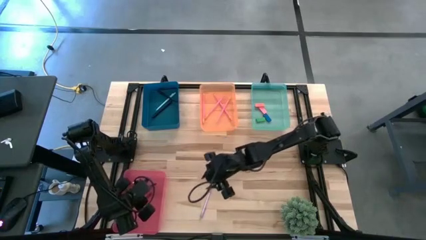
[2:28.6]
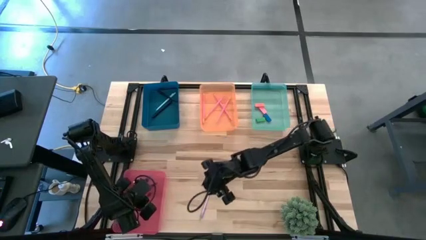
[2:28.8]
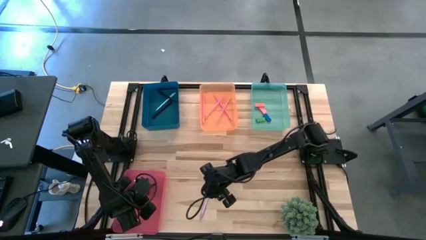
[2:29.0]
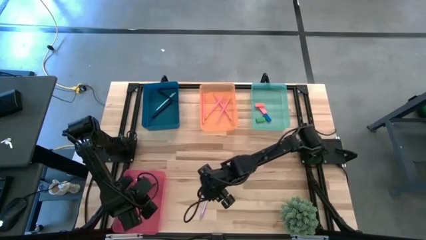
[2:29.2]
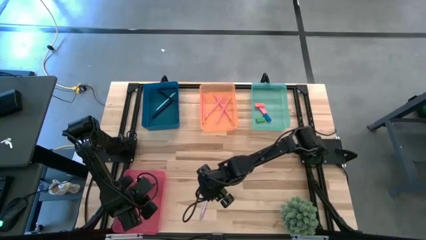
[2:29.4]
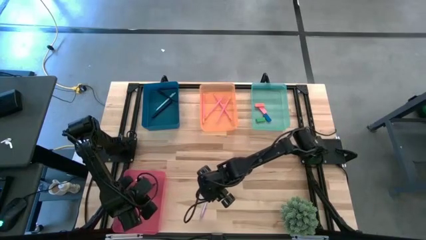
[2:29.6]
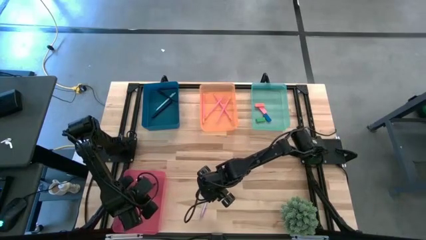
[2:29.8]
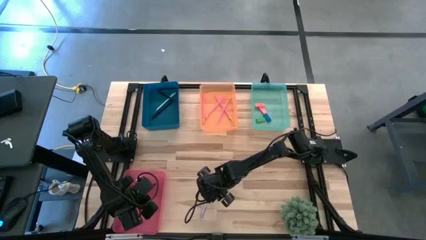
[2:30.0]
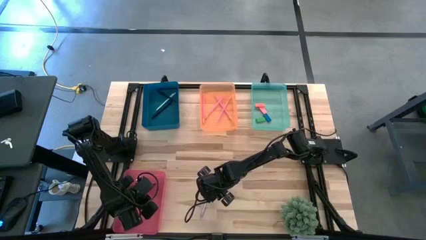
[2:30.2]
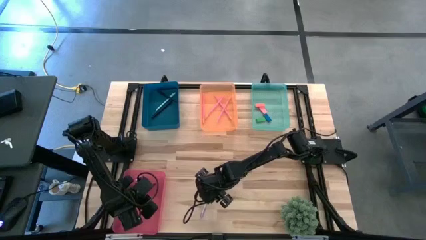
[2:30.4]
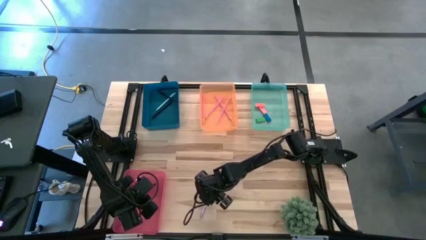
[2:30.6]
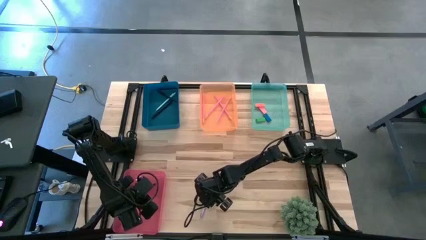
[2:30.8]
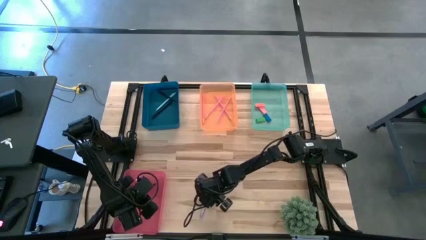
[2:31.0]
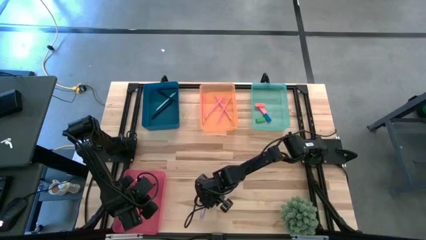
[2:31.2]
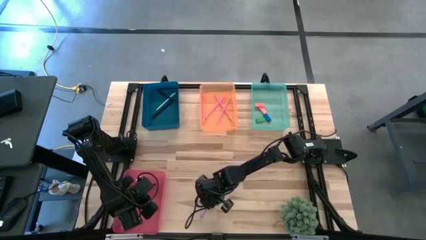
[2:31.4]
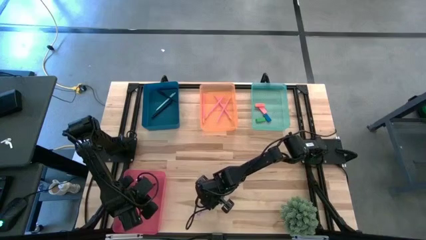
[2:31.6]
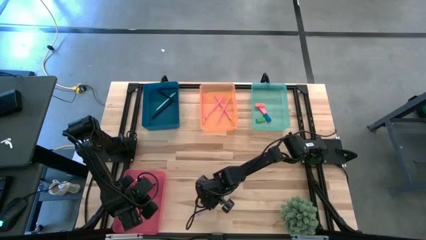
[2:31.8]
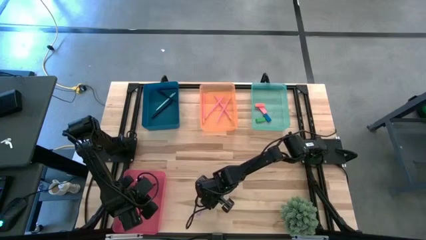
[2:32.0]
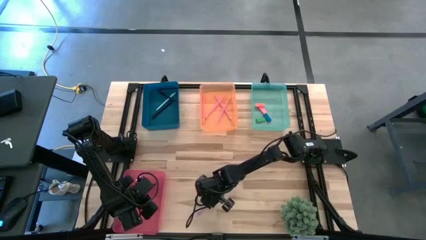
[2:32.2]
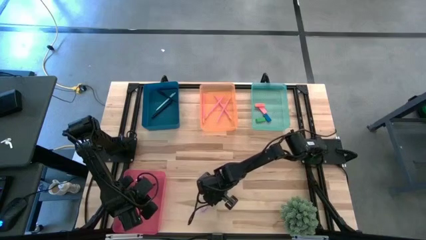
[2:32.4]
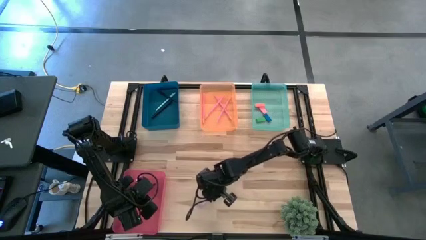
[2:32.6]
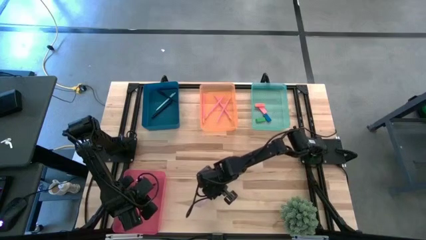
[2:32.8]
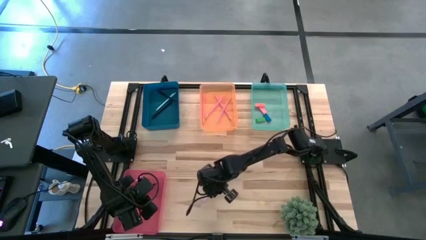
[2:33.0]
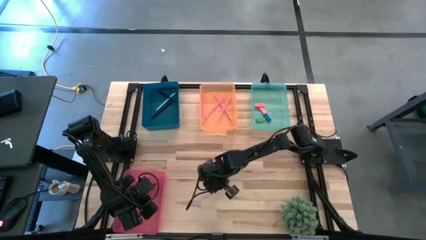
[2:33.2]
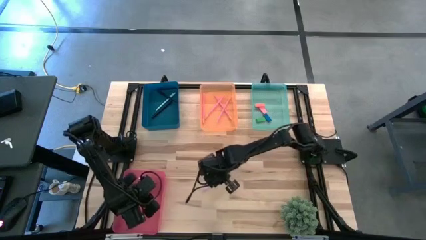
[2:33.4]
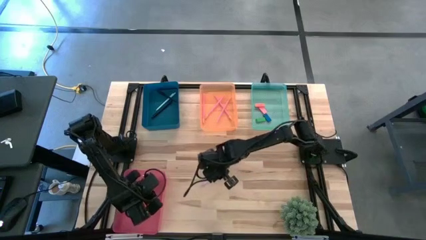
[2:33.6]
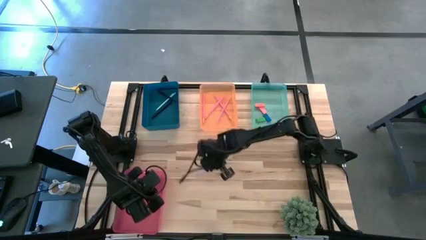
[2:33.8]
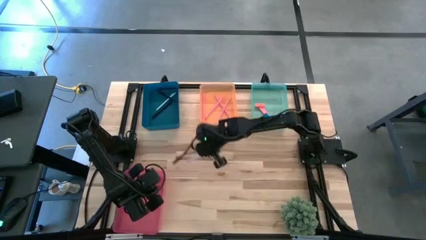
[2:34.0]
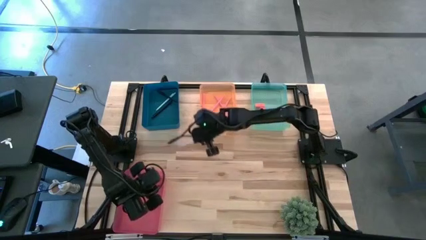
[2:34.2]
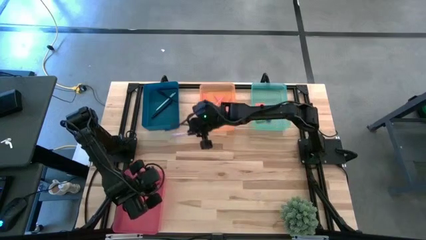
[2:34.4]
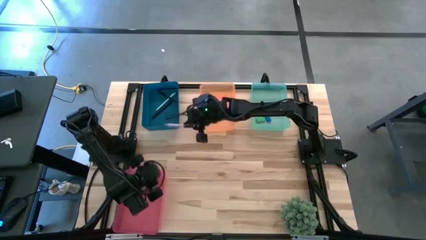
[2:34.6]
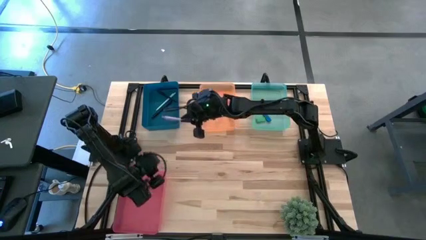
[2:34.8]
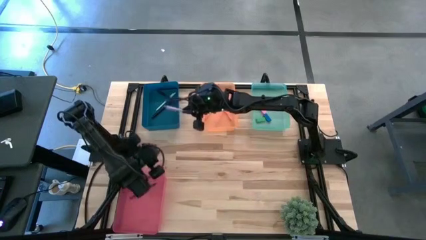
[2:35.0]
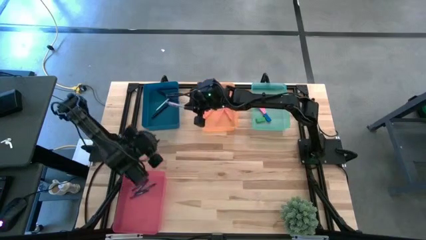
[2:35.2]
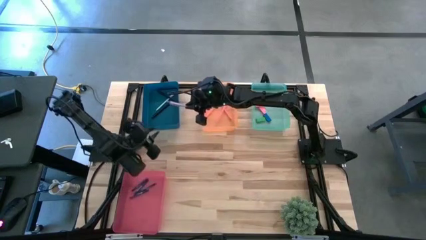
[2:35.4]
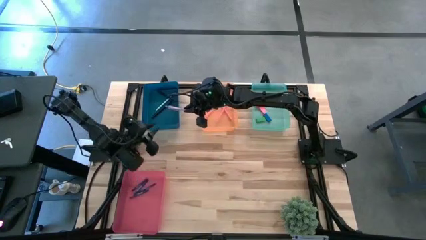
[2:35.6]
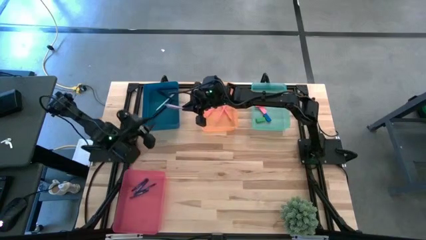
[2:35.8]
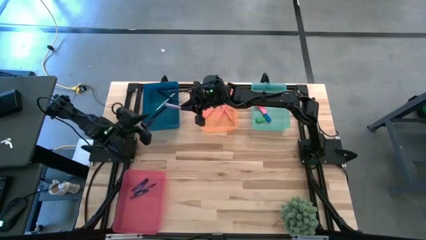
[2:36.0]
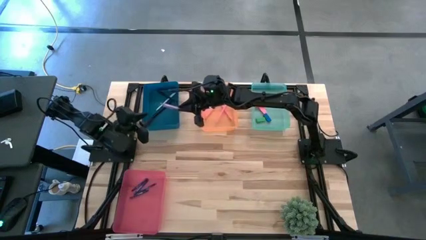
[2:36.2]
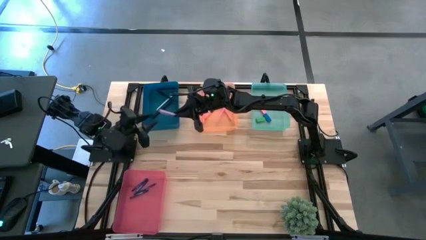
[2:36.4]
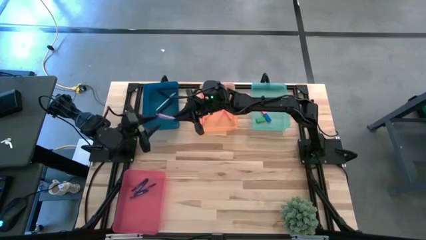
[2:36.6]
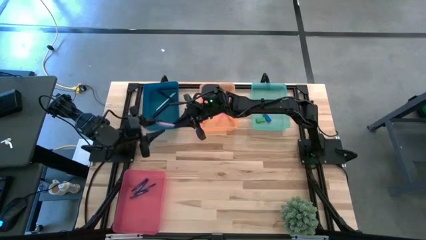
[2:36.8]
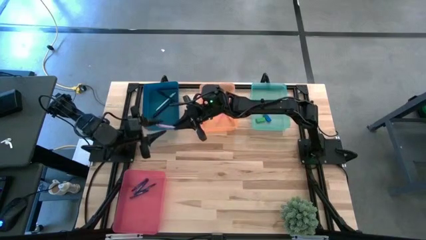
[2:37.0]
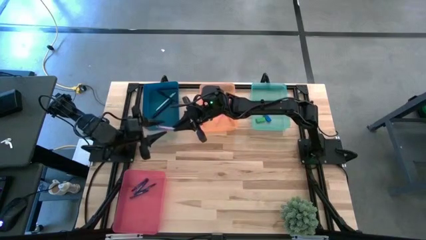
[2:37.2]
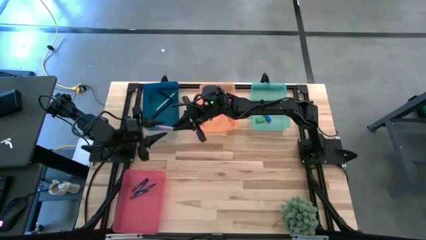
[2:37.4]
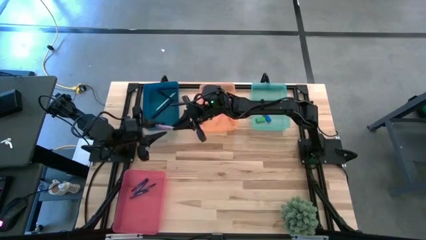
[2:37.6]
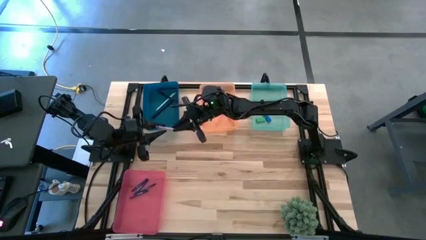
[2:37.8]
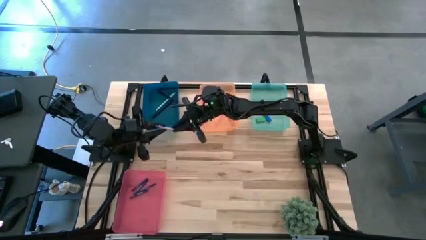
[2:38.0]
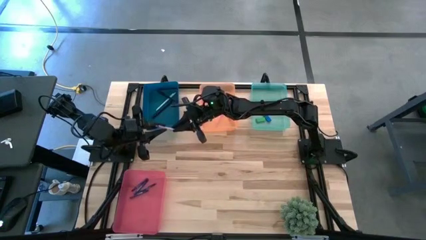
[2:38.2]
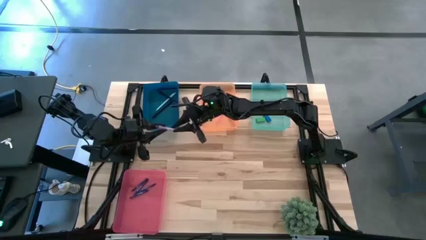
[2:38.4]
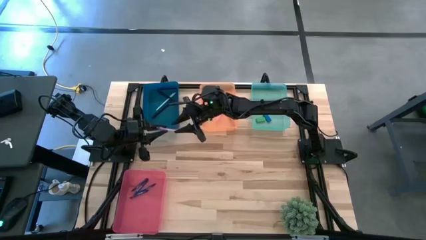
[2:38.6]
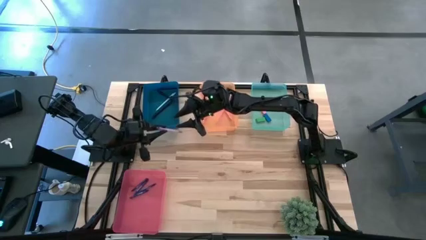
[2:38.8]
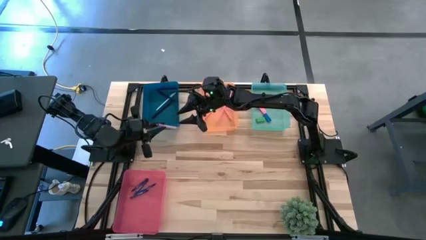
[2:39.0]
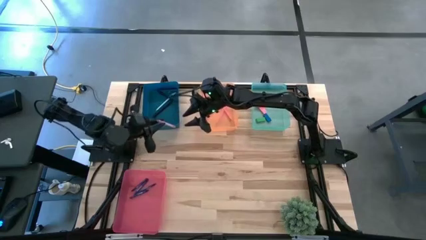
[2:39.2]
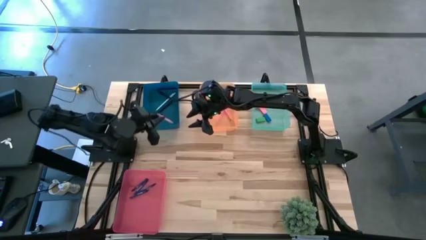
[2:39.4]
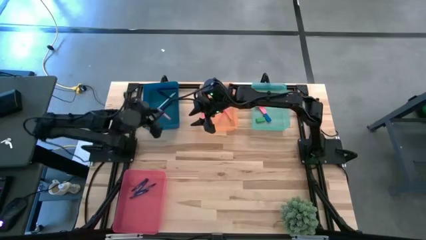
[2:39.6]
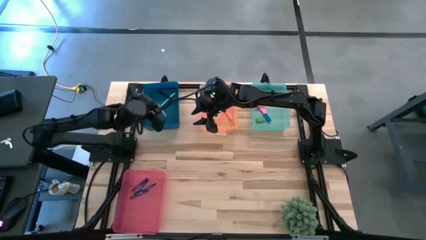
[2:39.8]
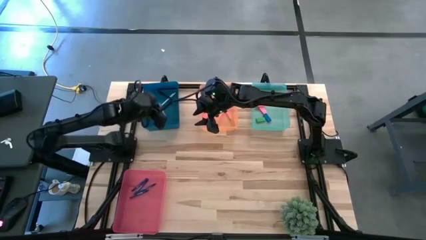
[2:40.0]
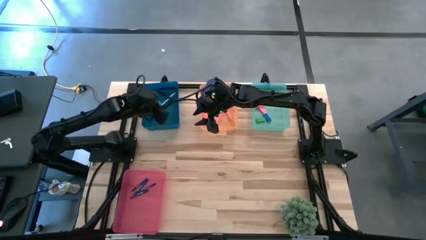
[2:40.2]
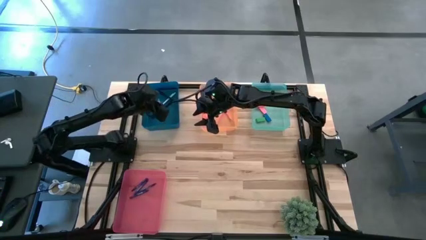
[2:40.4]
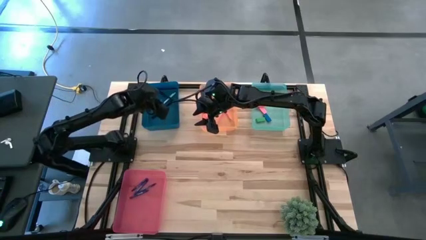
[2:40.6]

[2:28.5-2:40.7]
Task: Sort crayons/erasers/pens/pencils in bins
Put the purple pen into the blue bin

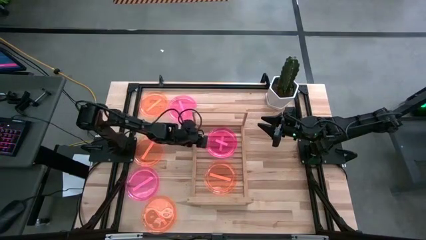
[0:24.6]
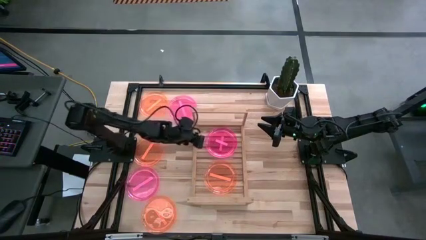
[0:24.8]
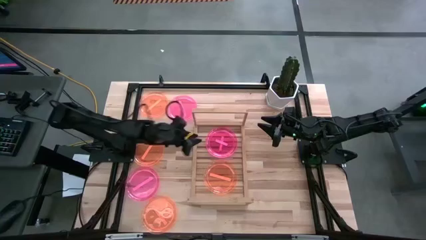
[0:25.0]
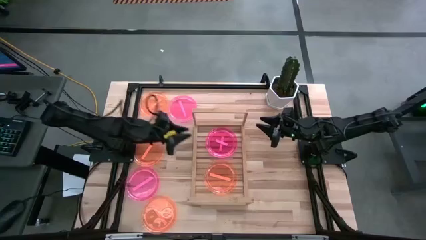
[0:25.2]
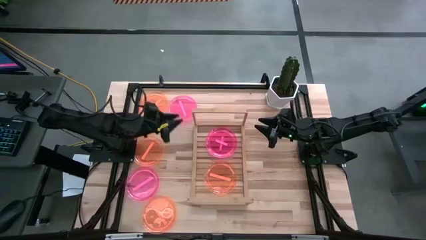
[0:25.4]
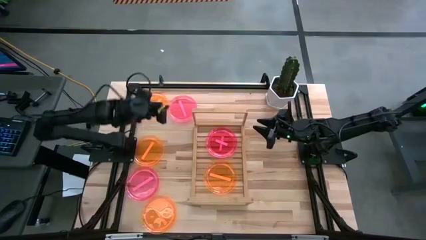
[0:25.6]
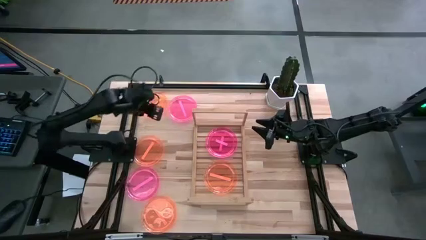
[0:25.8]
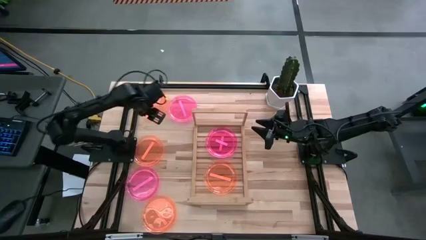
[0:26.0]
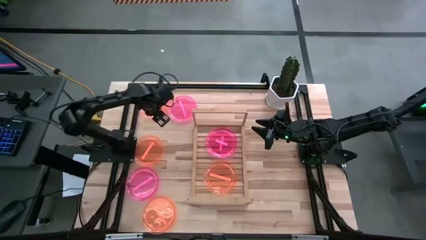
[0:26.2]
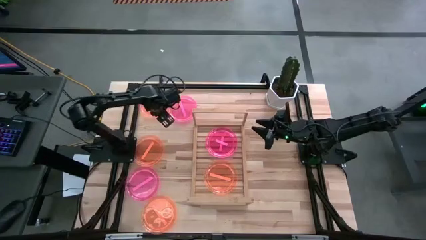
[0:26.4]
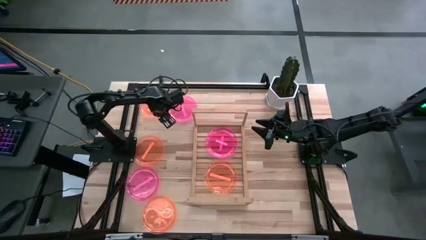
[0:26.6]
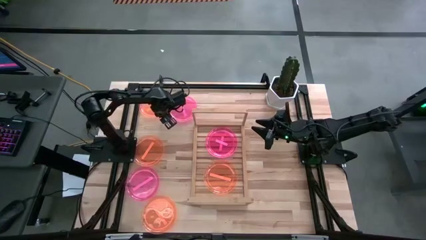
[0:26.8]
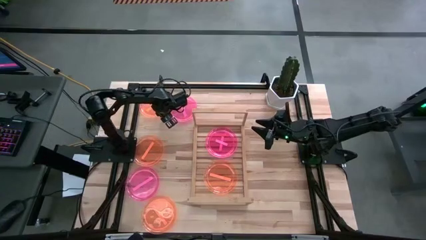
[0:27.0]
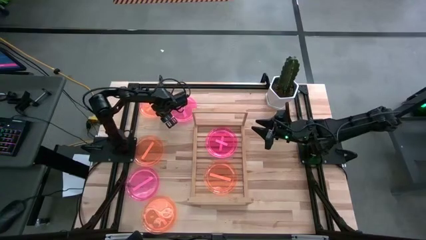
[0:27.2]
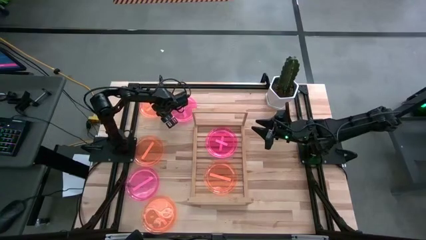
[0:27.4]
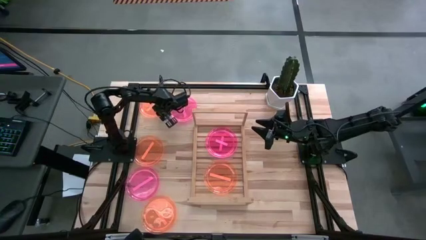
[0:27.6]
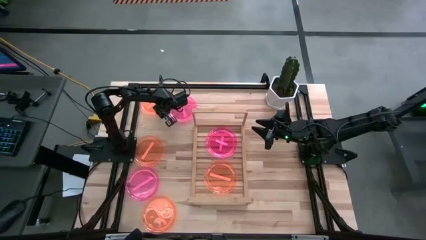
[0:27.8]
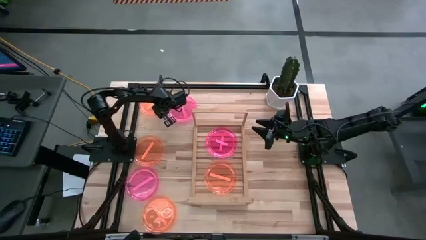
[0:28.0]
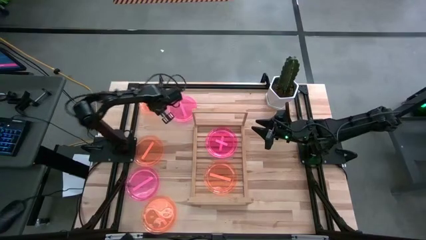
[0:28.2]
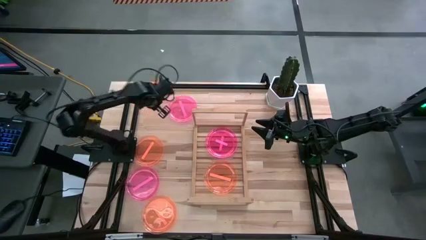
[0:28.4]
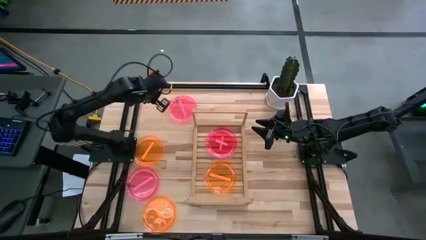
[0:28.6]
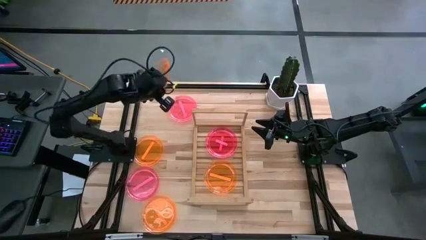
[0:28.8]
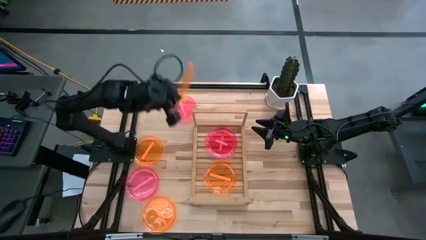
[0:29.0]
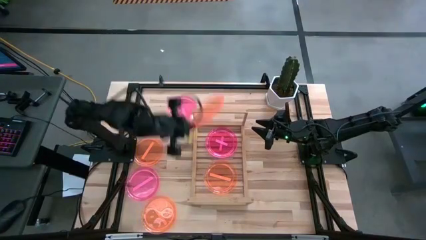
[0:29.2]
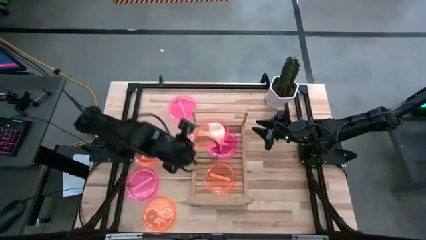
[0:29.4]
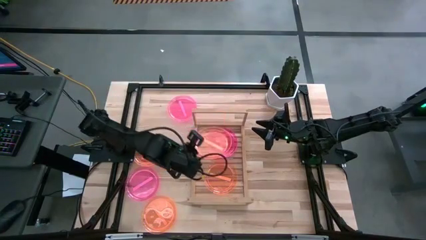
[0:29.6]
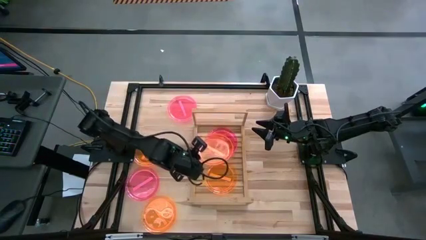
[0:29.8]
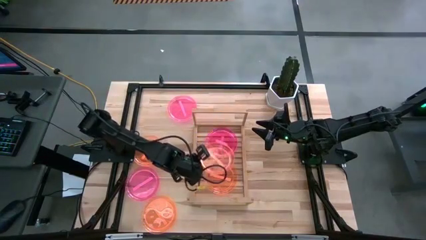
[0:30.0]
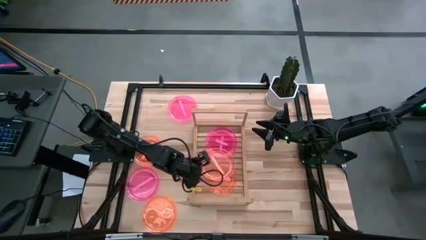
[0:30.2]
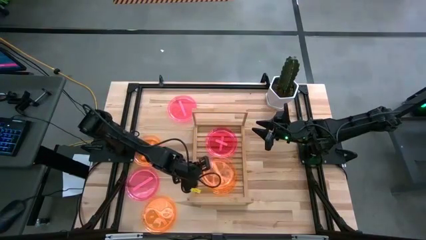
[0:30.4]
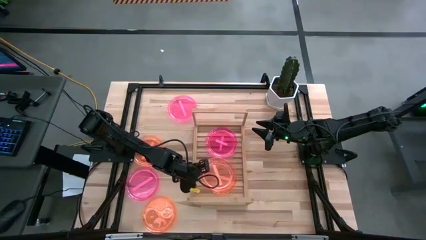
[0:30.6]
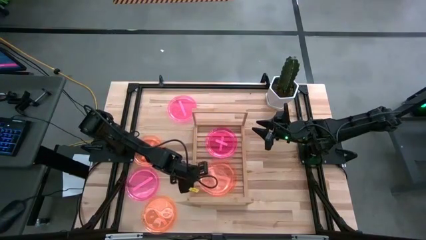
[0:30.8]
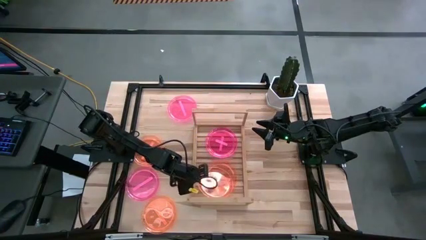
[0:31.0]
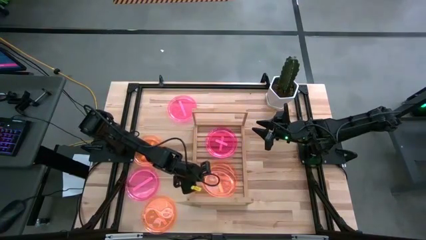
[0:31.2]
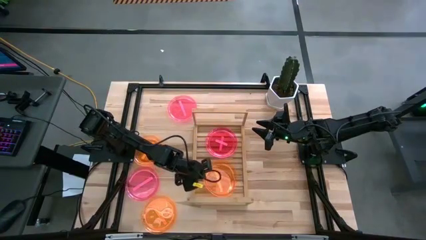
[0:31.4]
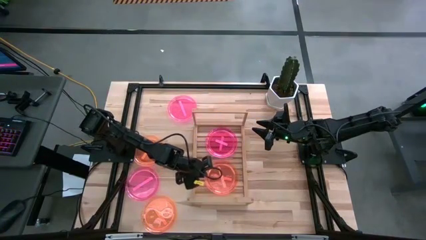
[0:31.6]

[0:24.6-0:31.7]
Task: Place and stack plates onto a shelf
Stack the orange plate on top of the orange plate on the shelf
